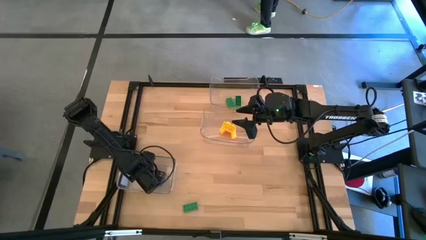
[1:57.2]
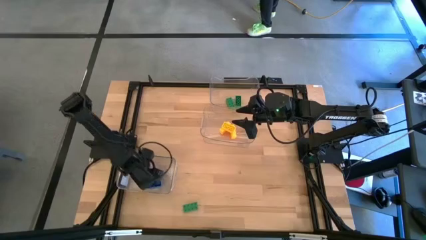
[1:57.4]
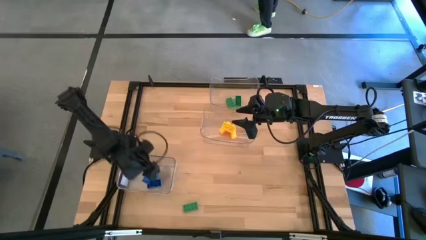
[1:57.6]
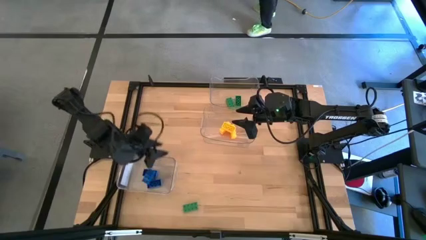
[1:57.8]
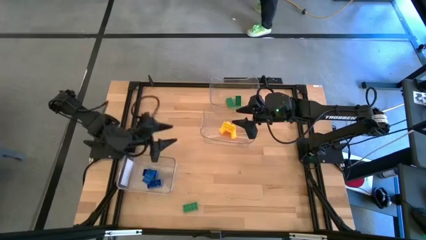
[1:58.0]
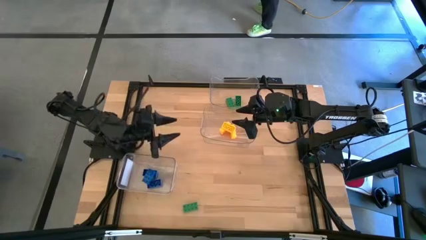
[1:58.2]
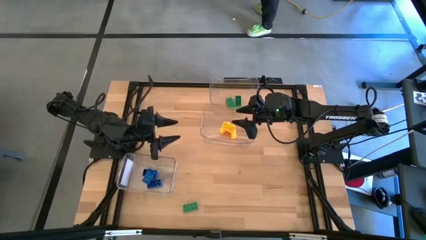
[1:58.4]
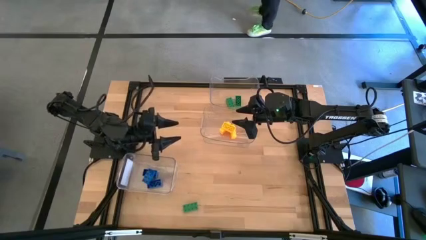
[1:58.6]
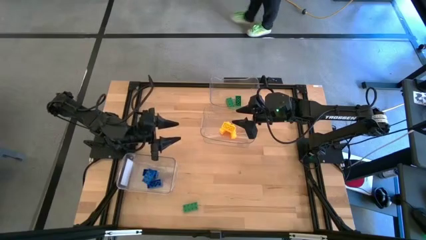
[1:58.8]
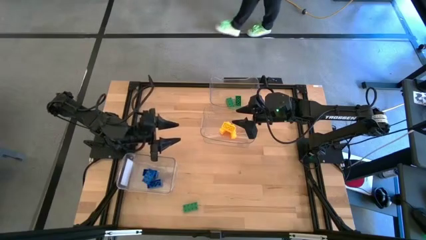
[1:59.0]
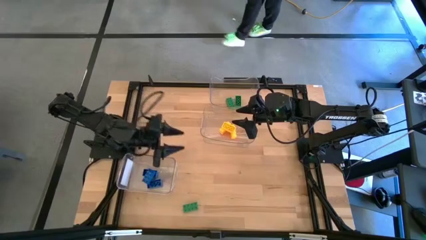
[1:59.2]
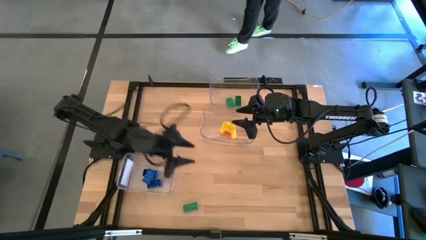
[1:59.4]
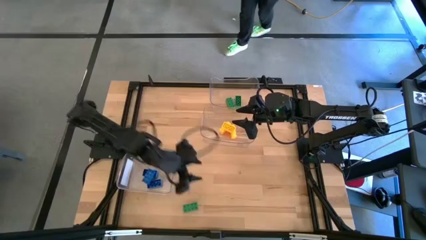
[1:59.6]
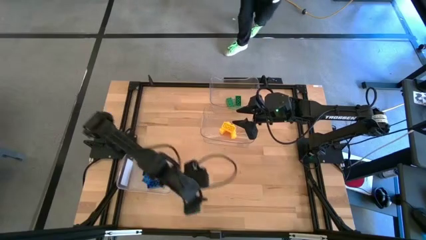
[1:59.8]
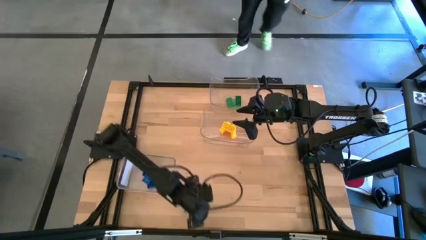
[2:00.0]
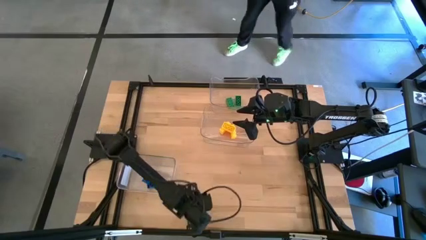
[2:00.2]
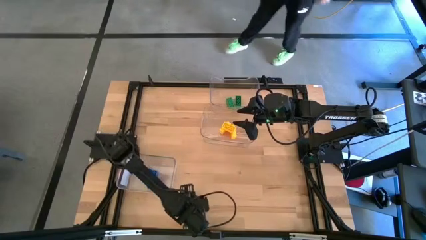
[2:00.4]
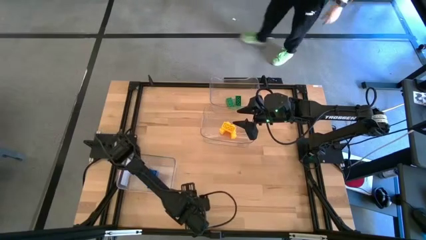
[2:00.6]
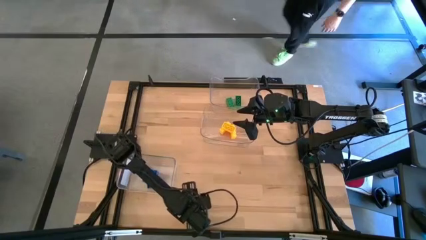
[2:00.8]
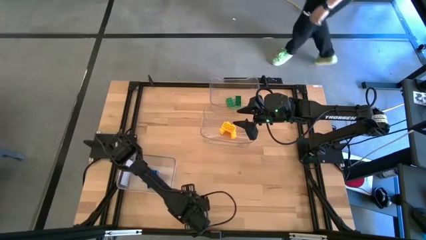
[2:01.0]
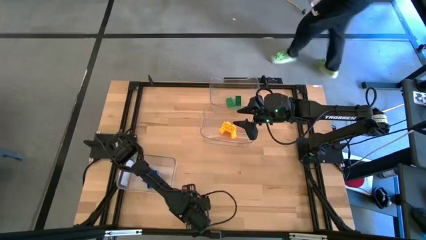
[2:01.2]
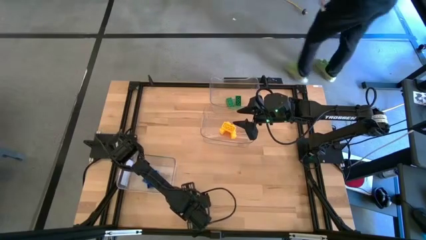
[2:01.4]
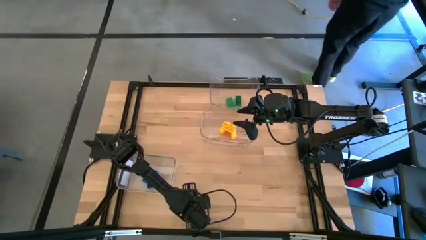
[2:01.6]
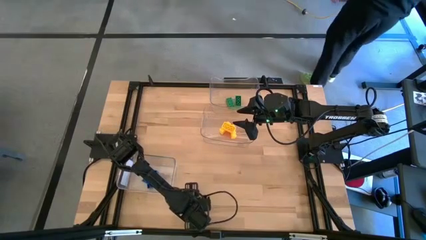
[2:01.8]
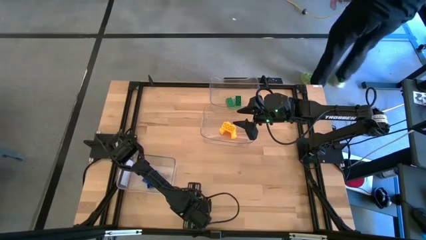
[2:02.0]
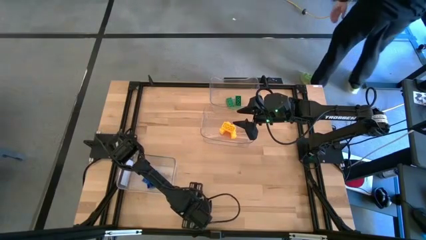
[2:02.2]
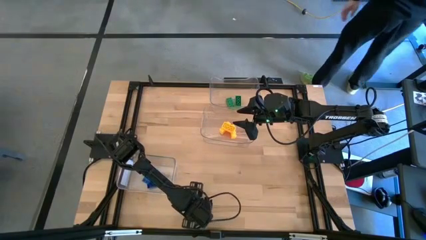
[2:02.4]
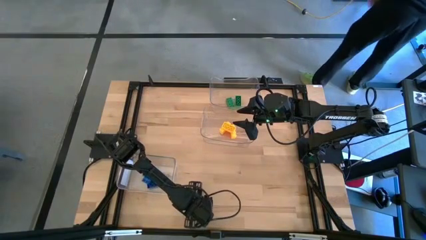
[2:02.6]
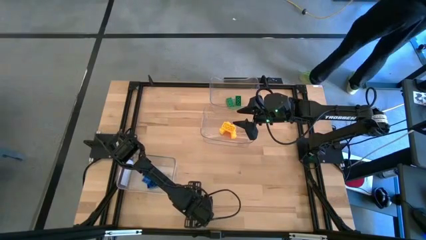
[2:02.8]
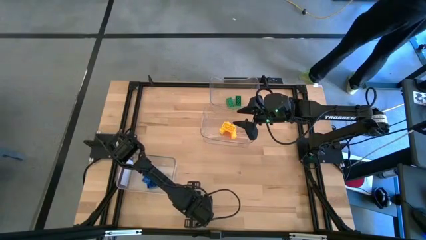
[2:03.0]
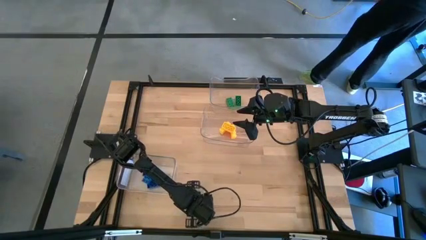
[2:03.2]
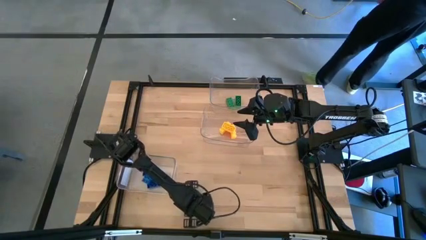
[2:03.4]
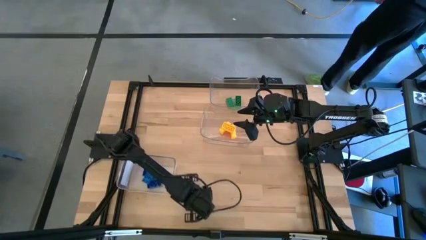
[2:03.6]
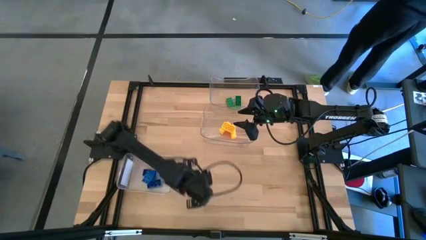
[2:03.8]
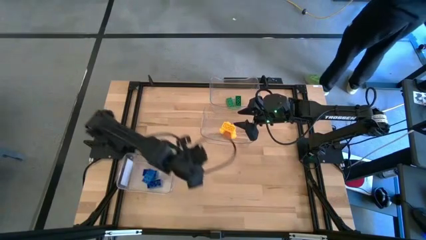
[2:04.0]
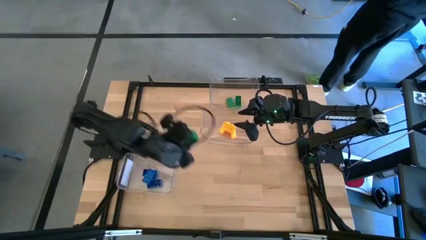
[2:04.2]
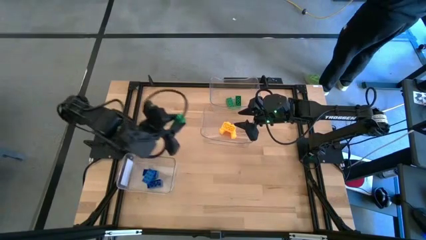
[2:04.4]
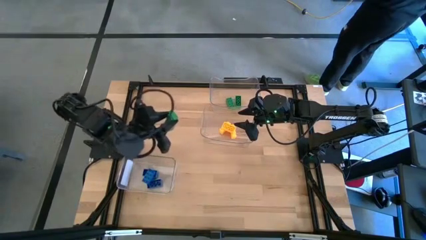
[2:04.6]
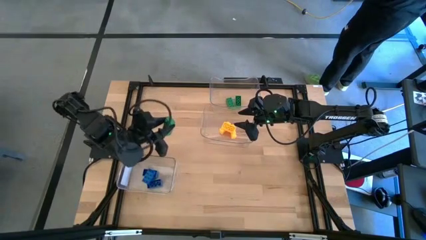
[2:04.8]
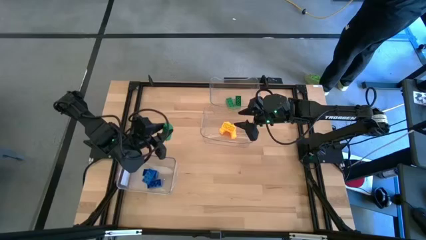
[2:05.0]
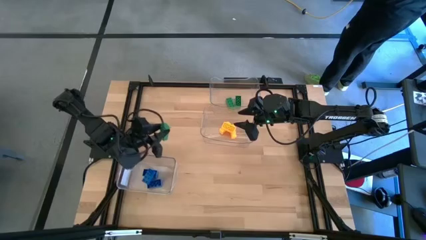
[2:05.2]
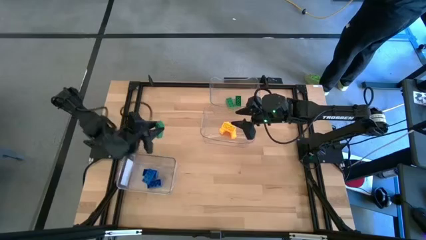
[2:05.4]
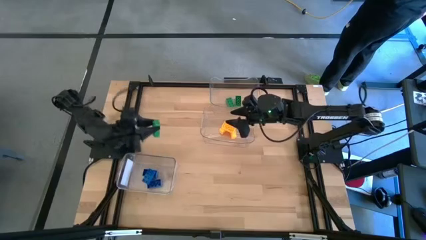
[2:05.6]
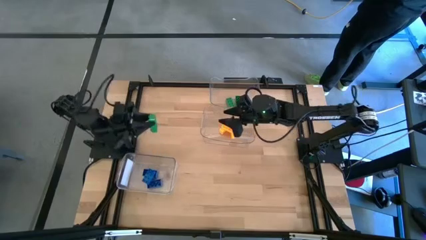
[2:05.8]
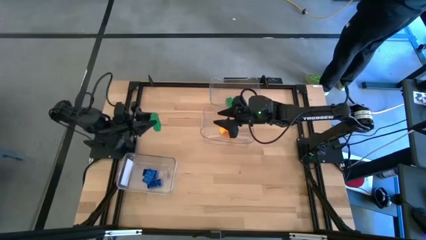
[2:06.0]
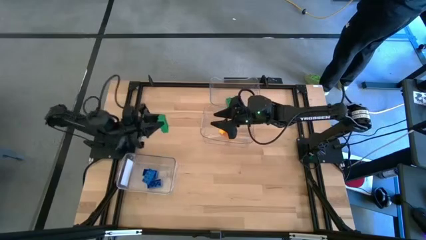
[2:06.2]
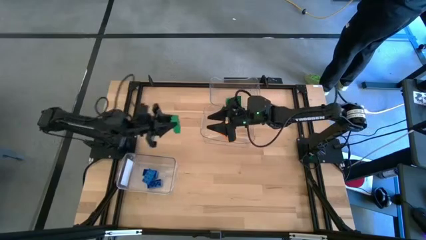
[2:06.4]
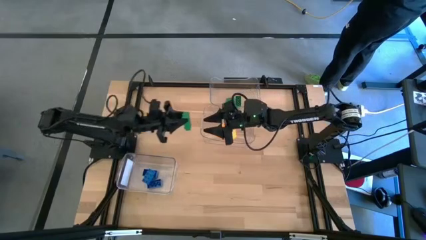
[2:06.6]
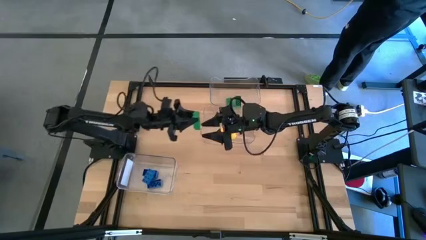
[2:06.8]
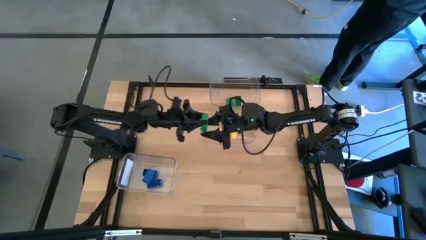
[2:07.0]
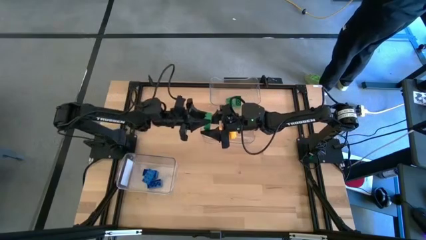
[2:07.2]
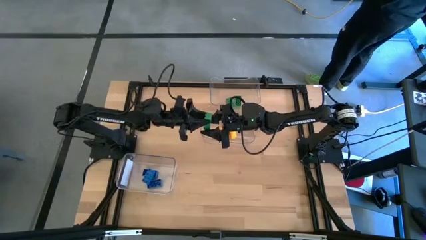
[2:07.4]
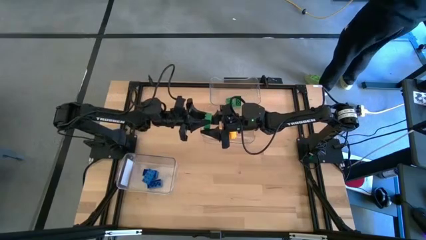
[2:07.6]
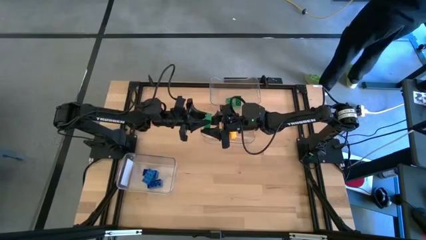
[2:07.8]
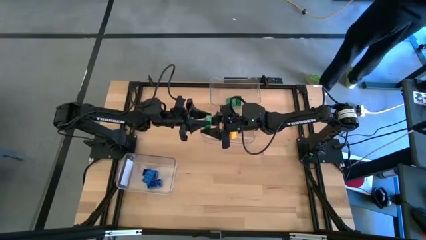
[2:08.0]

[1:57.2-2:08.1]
Task: Sort & place blocks by color
Put the green game piece into the top transparent bin
